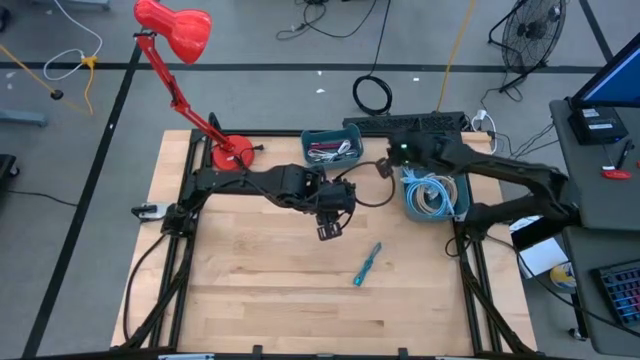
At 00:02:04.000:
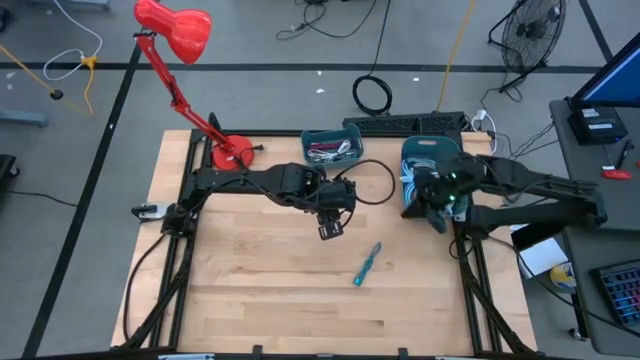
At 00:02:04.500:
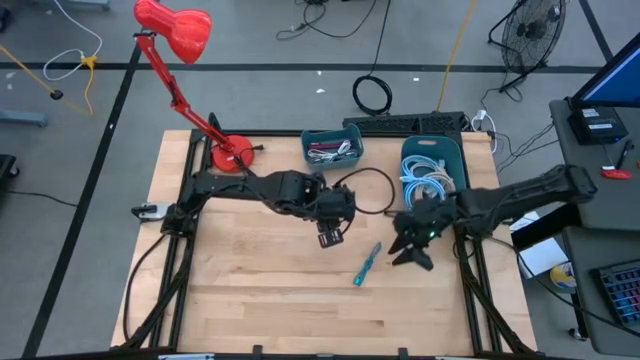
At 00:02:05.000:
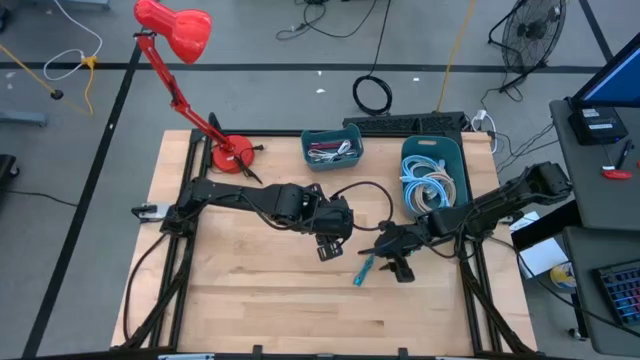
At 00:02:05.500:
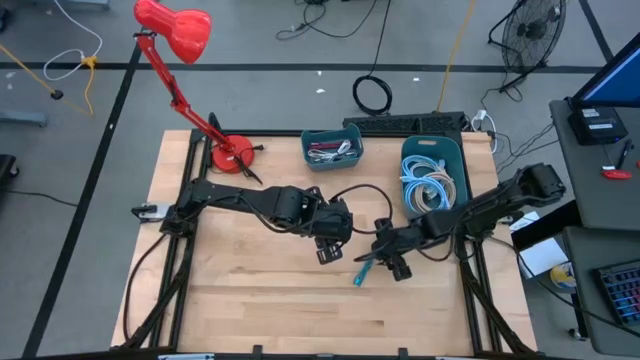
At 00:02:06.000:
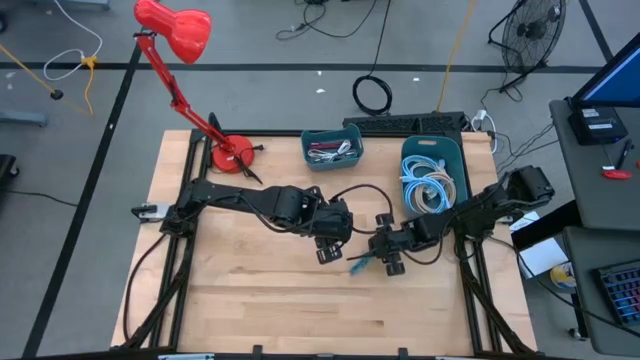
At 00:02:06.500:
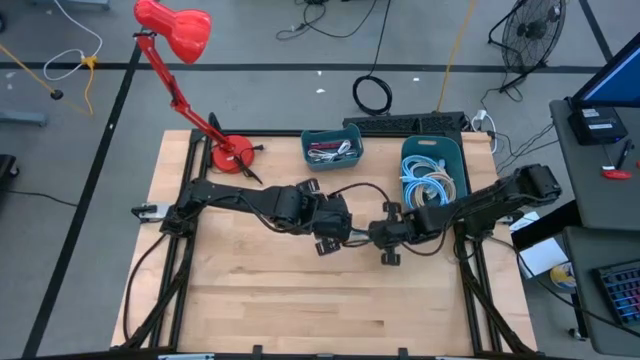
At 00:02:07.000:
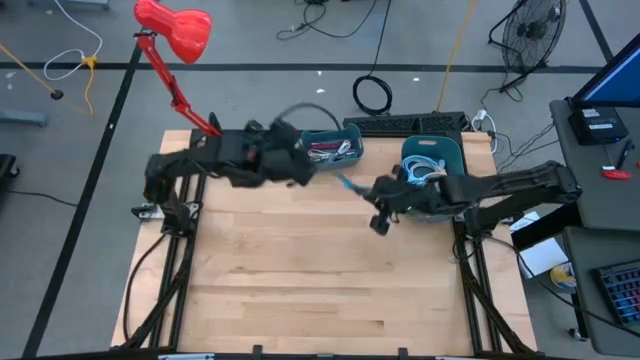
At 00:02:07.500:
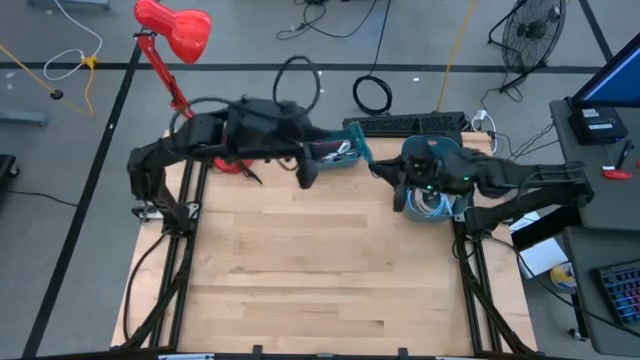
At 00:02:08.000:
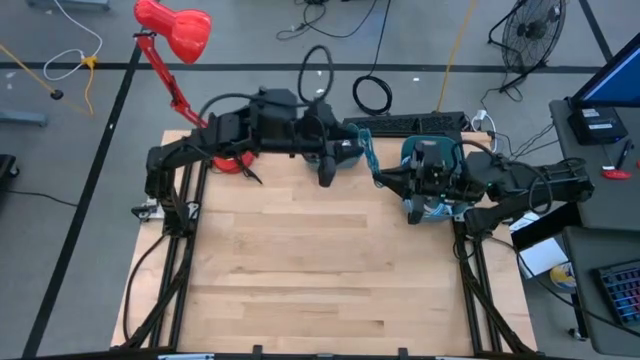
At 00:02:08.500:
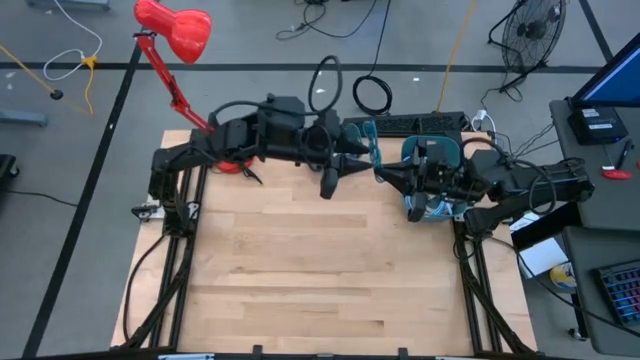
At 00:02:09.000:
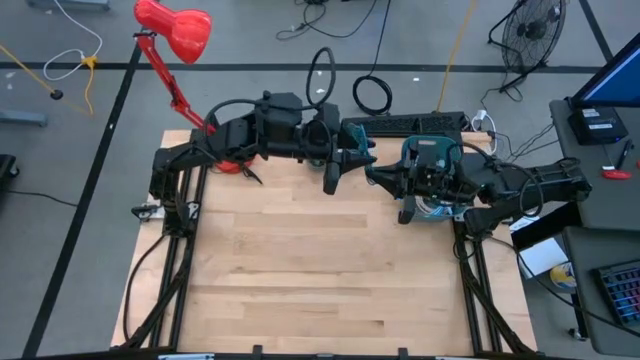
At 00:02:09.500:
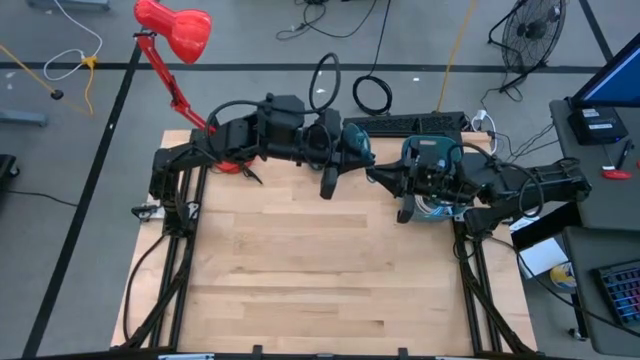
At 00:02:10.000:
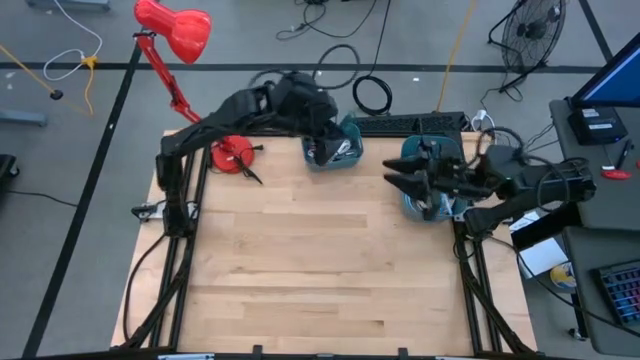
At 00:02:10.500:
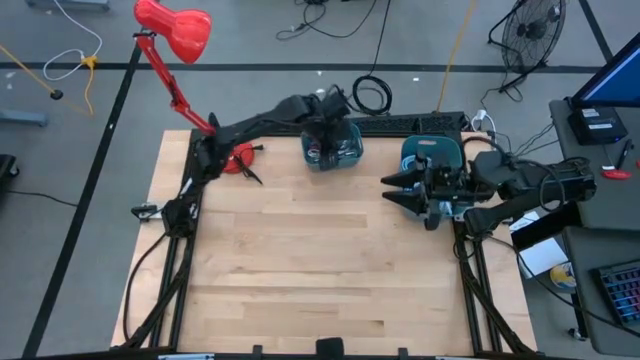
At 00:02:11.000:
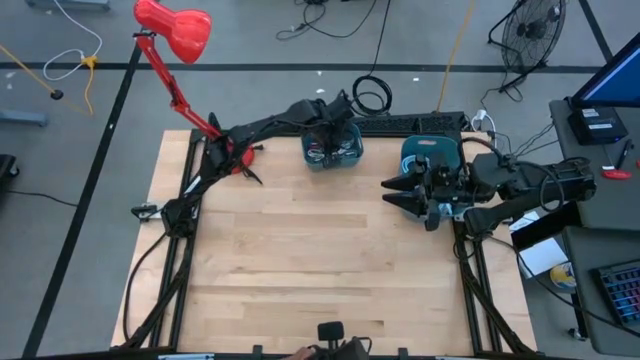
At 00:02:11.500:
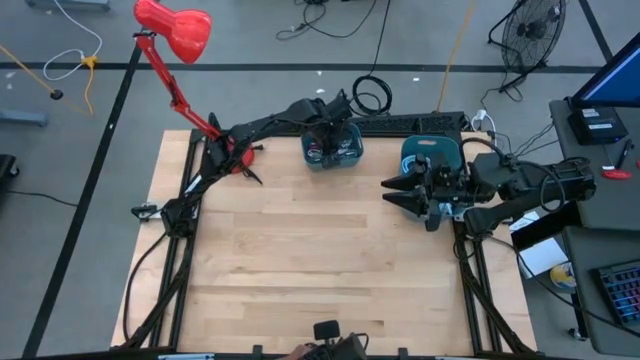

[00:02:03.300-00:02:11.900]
Task: Pick & Place USB Port
Put the blue charger cable into the left blue bin

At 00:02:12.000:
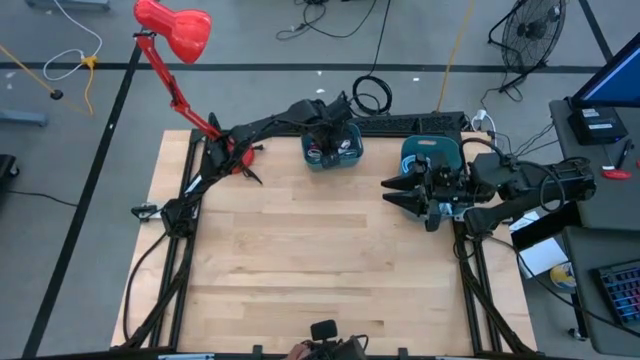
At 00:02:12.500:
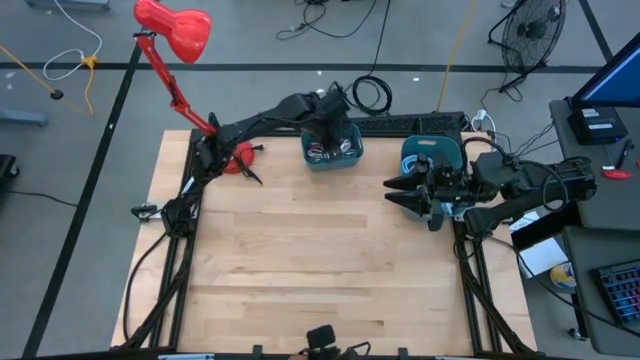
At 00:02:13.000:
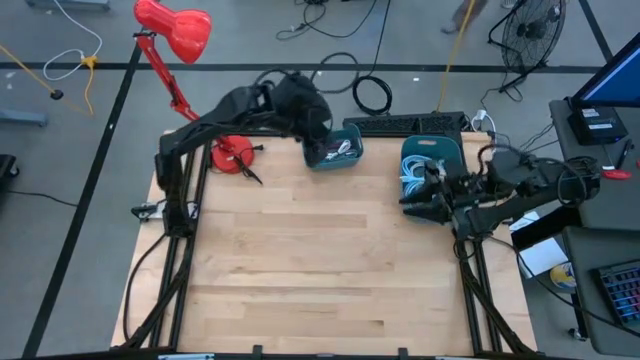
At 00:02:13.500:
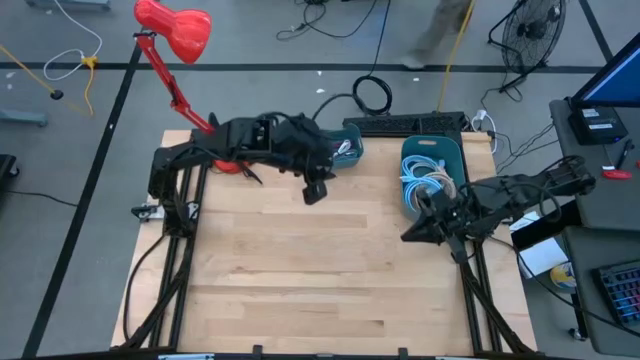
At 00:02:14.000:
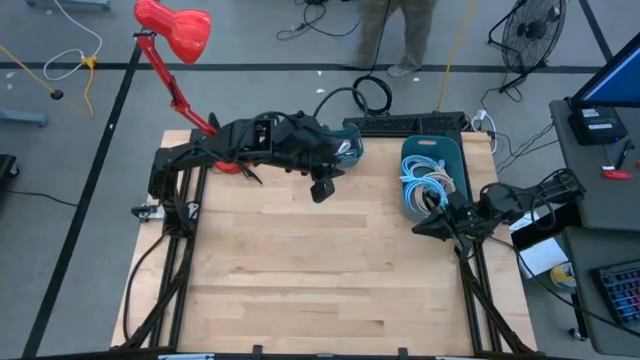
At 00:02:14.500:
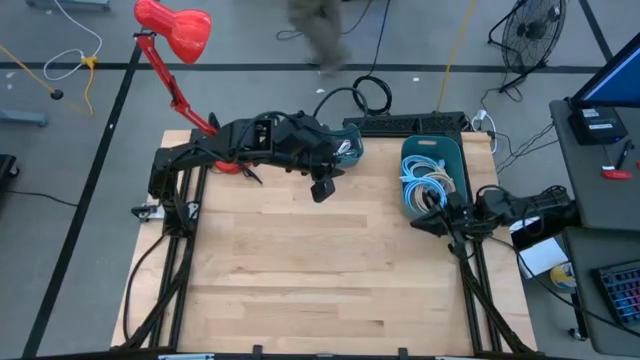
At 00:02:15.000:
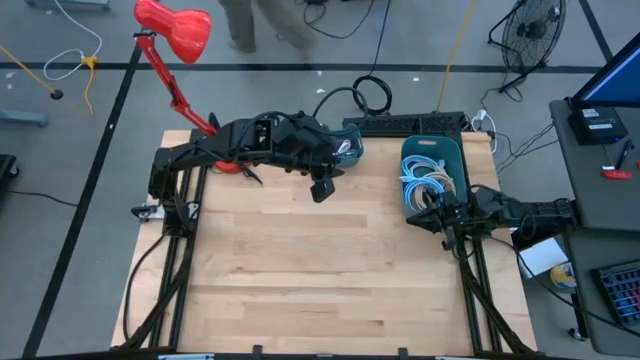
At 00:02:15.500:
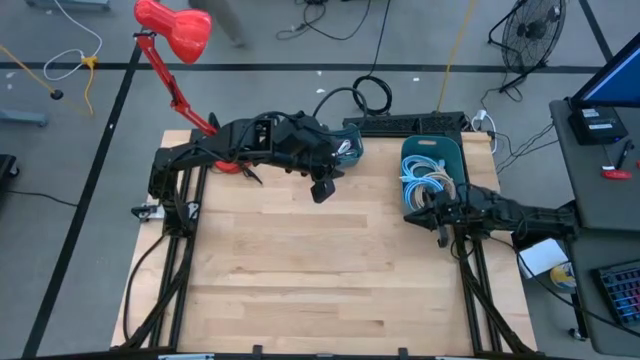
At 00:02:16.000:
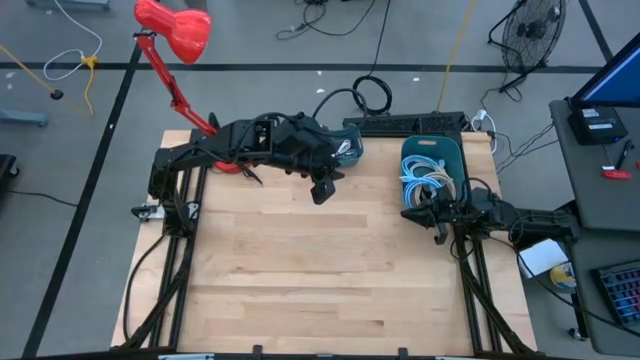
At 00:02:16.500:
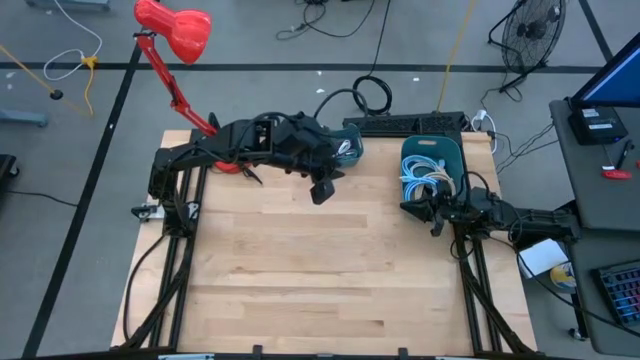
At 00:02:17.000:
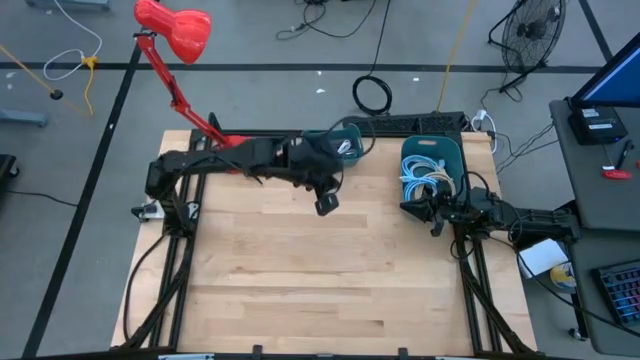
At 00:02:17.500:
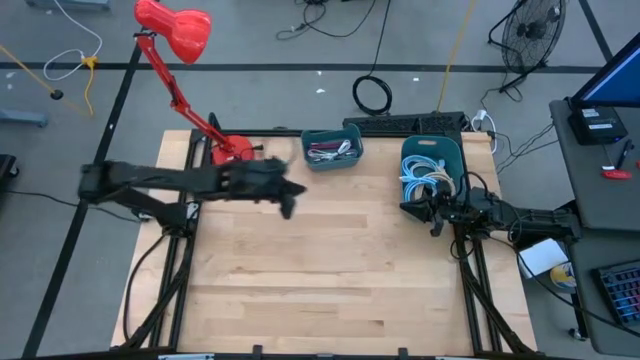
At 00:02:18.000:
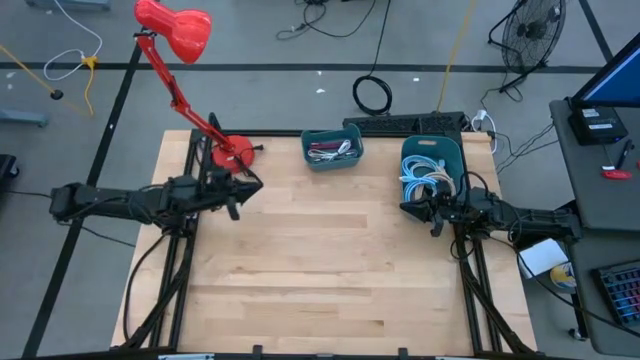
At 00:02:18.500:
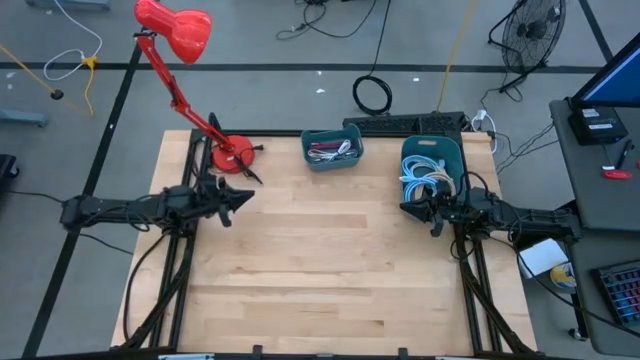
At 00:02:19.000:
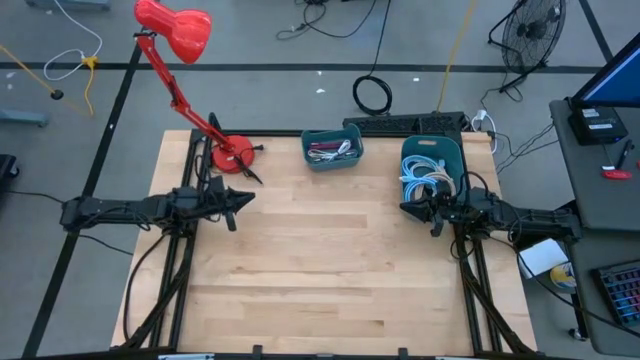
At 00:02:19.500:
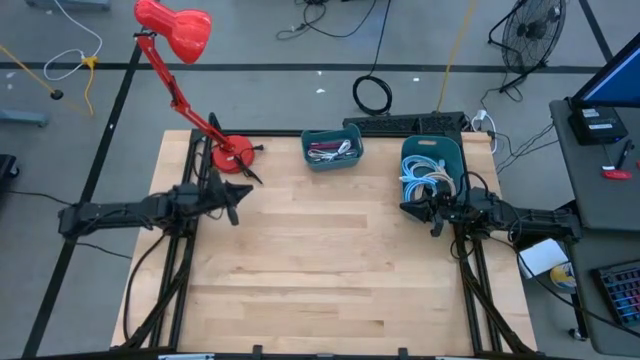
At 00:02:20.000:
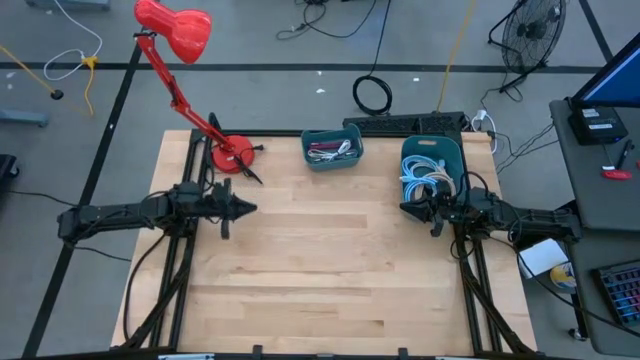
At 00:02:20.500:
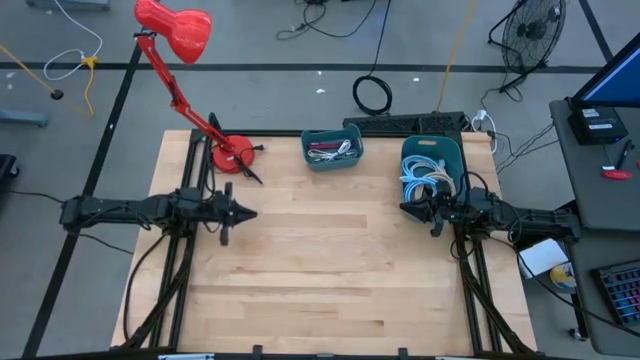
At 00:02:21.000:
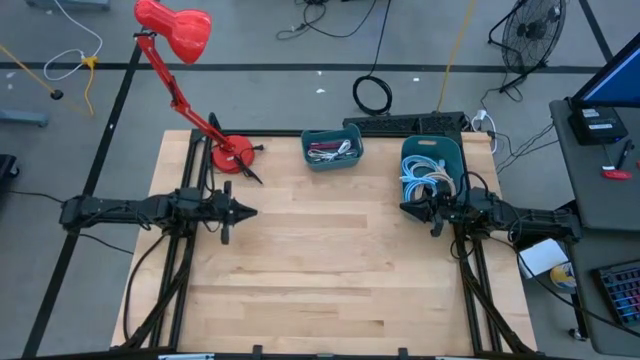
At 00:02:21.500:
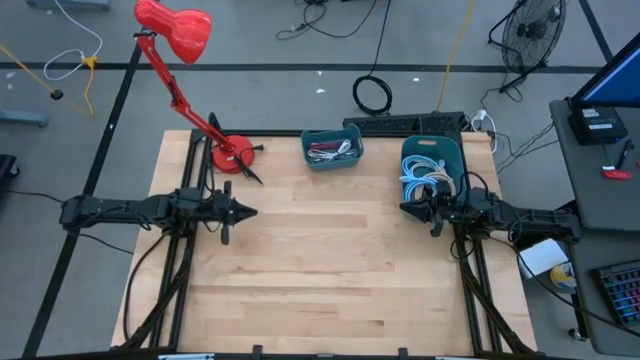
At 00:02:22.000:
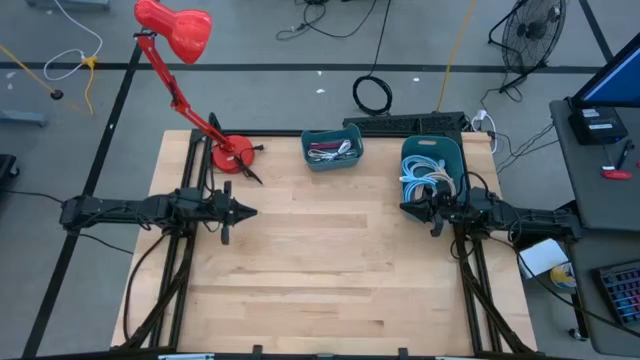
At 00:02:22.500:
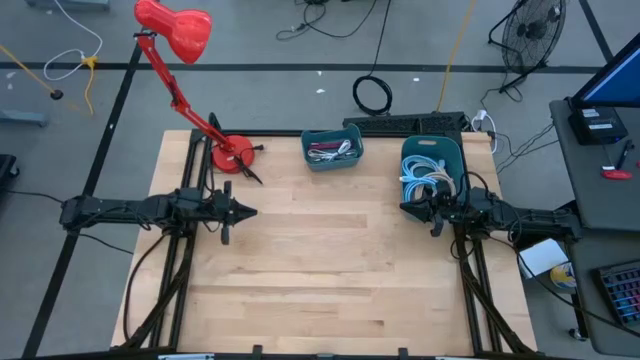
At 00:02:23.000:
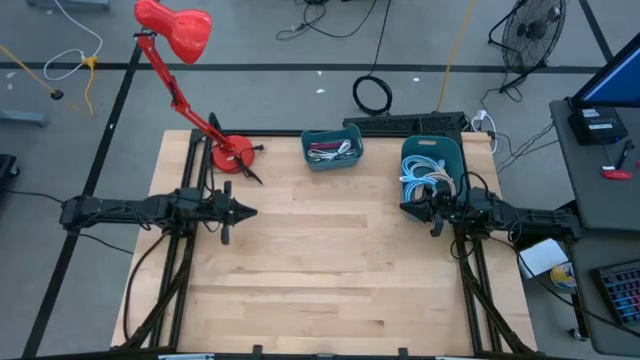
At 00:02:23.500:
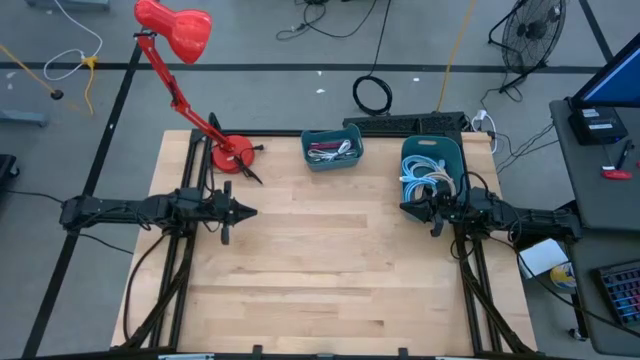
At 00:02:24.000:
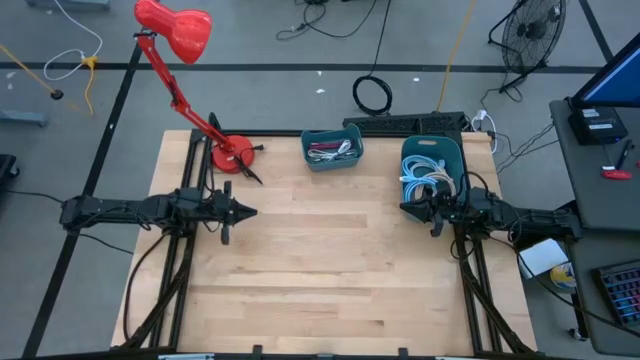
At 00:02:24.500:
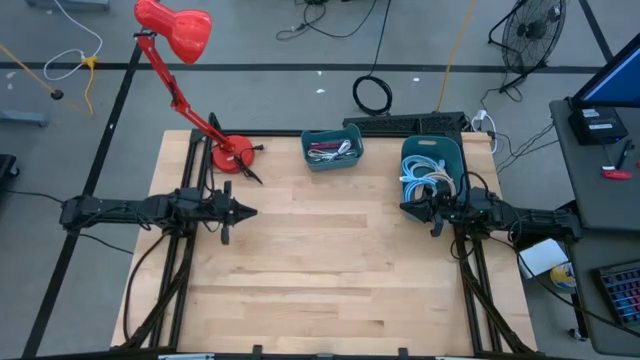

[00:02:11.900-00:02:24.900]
Return to Home Position

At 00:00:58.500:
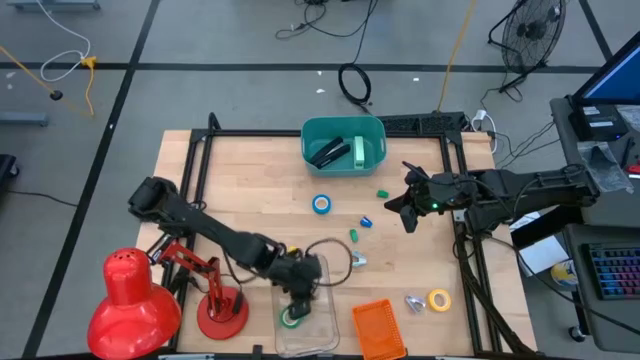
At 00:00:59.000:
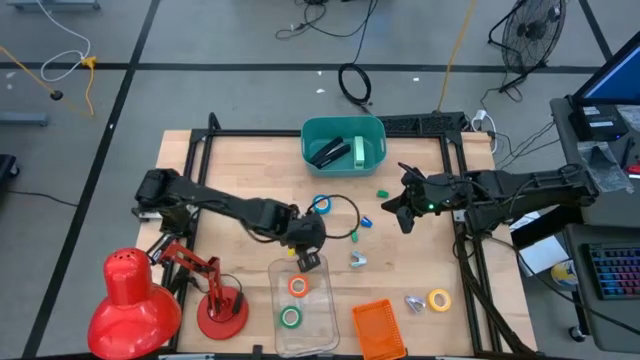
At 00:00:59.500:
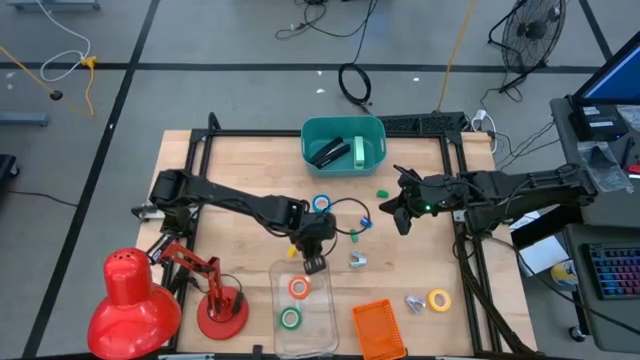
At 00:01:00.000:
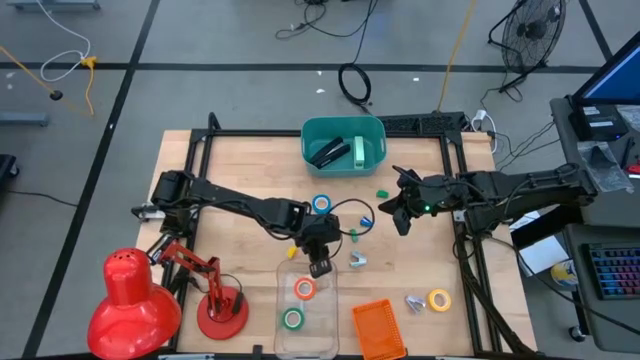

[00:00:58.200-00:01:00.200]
Task: Pick and place Stapler, Stapler remover, tape
Adjust the transparent bin
